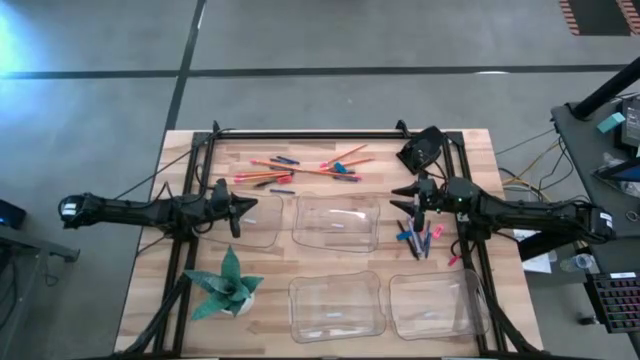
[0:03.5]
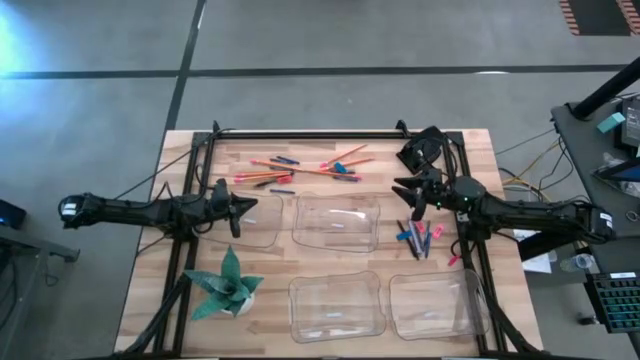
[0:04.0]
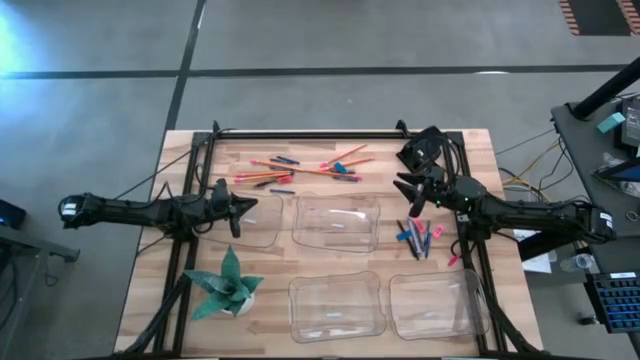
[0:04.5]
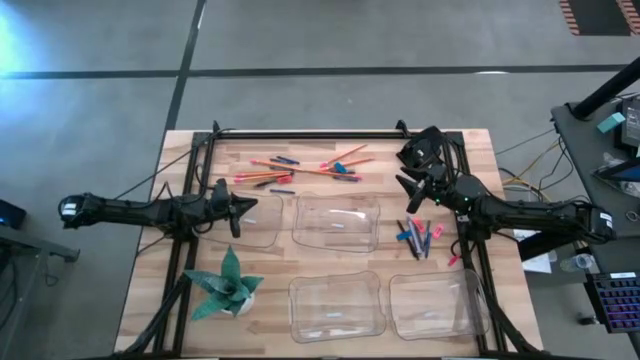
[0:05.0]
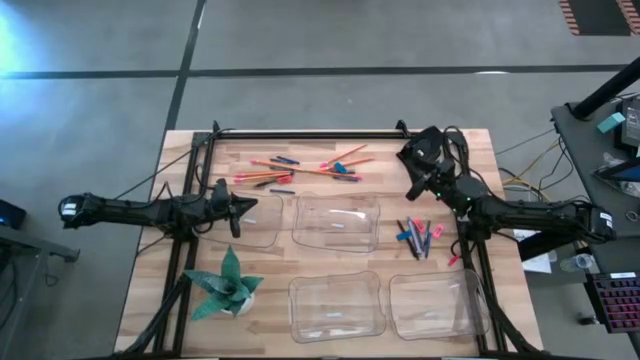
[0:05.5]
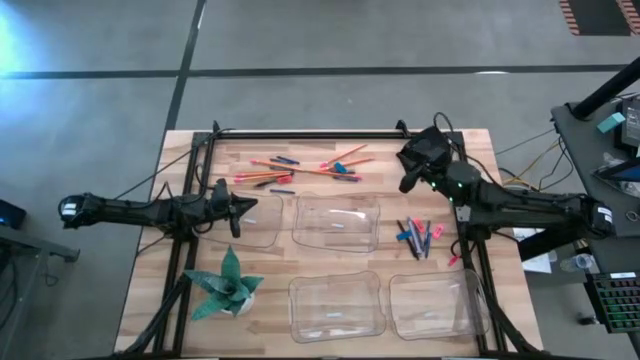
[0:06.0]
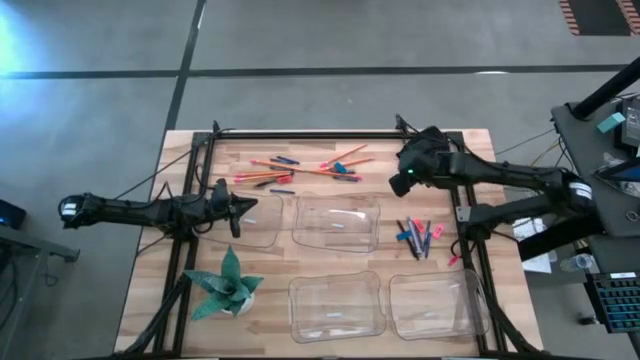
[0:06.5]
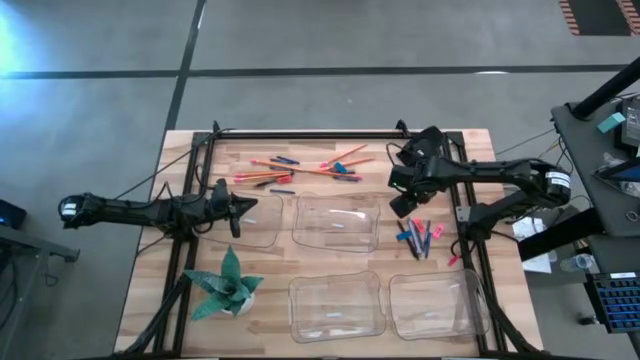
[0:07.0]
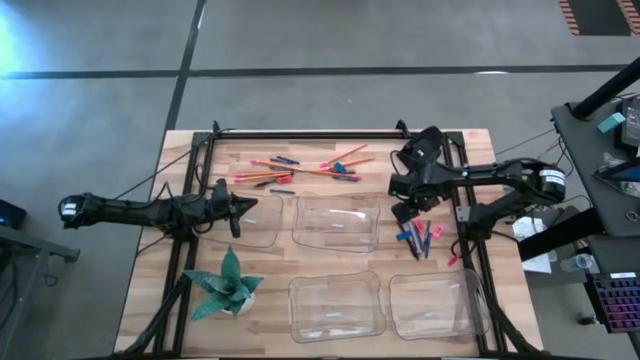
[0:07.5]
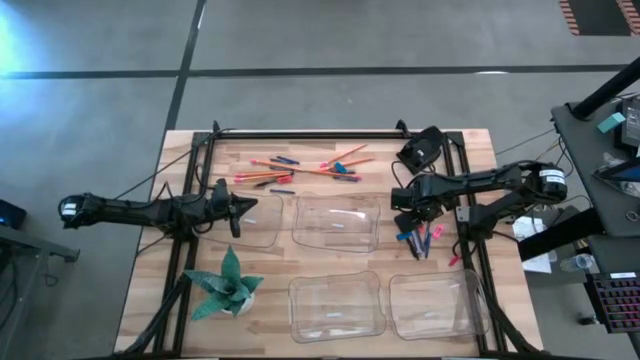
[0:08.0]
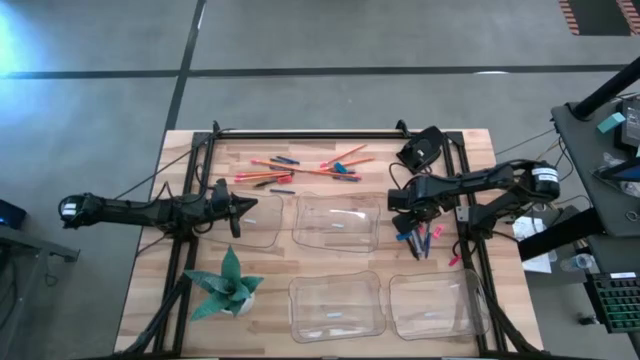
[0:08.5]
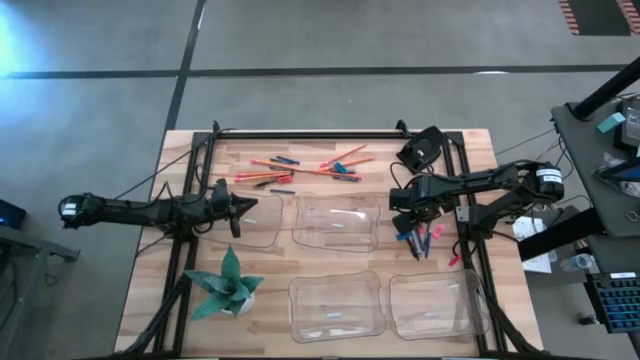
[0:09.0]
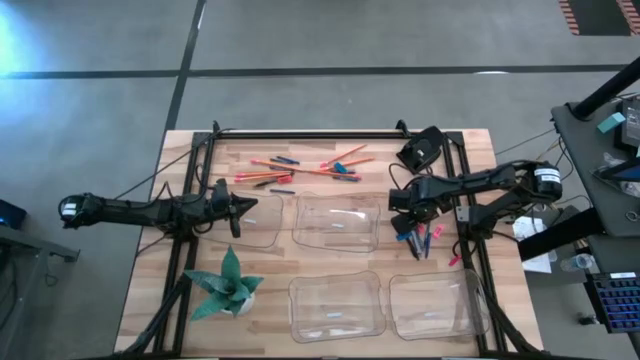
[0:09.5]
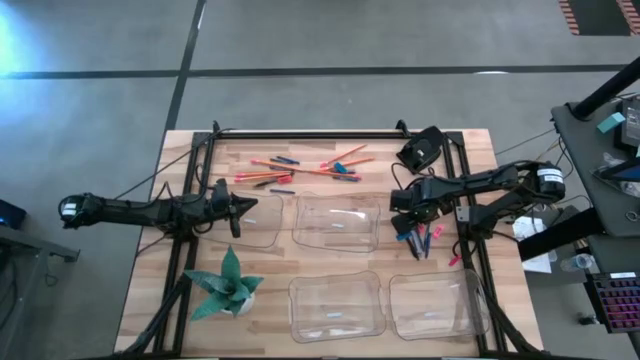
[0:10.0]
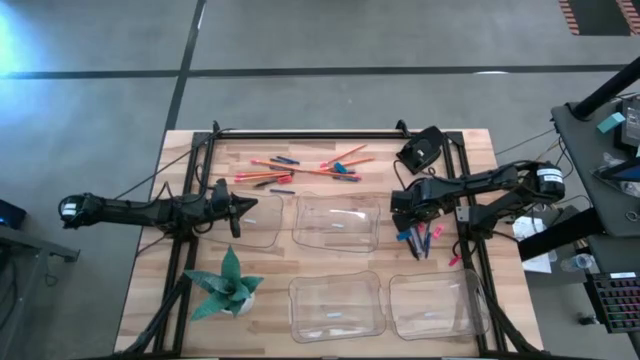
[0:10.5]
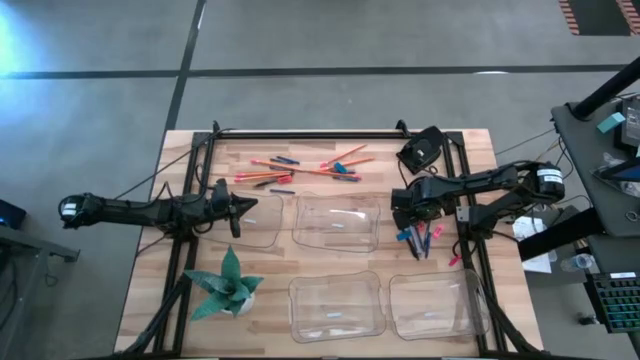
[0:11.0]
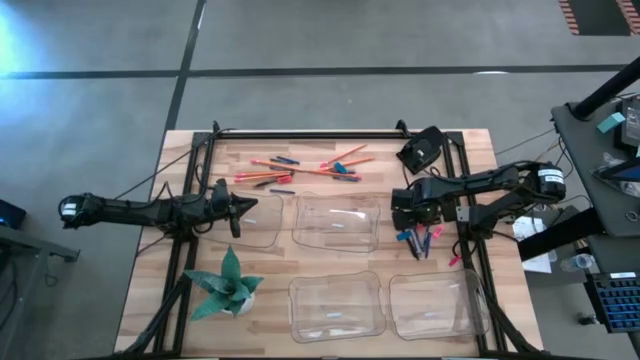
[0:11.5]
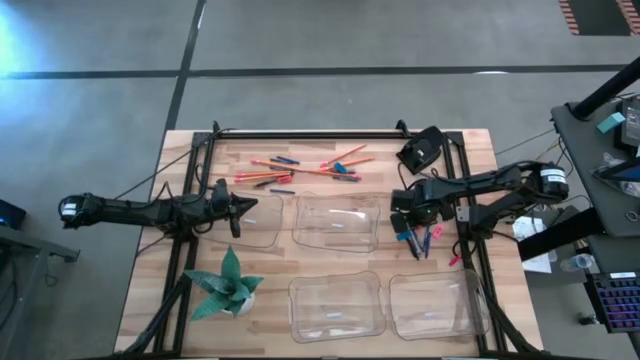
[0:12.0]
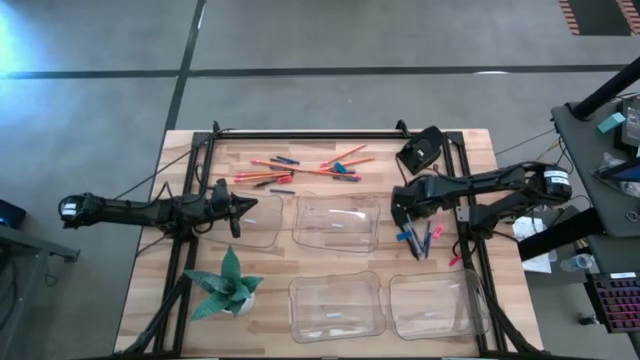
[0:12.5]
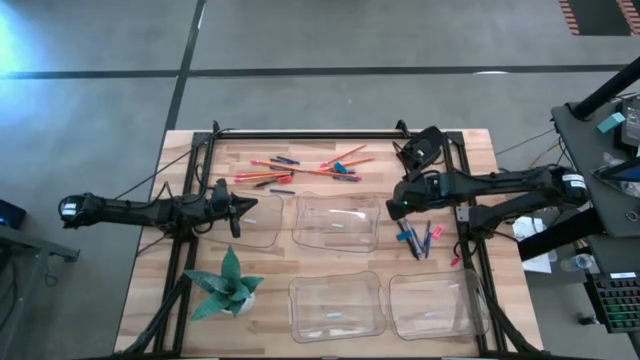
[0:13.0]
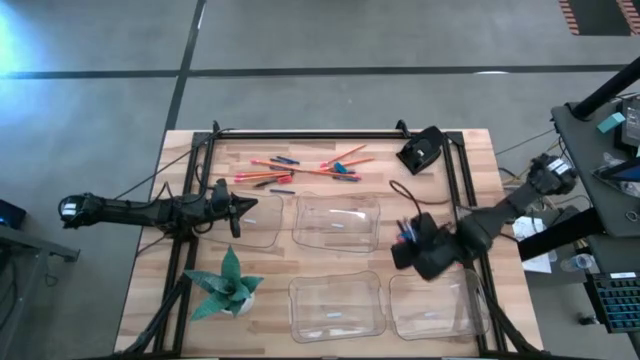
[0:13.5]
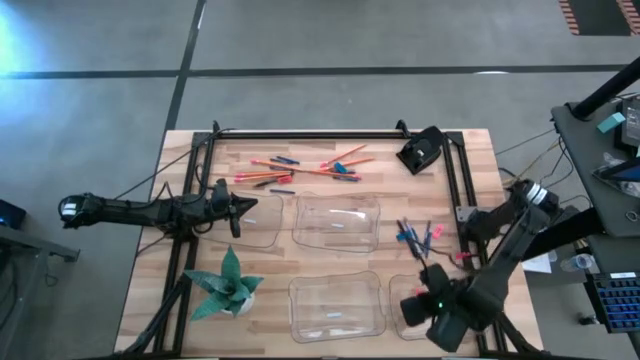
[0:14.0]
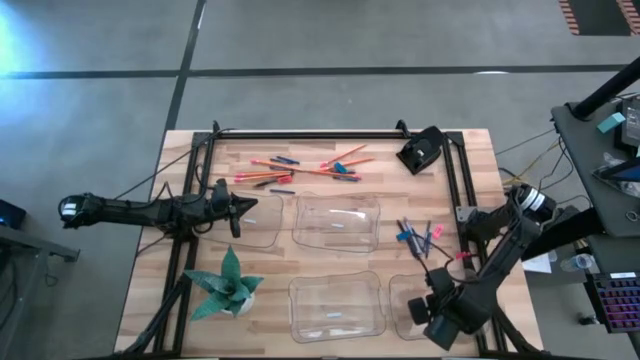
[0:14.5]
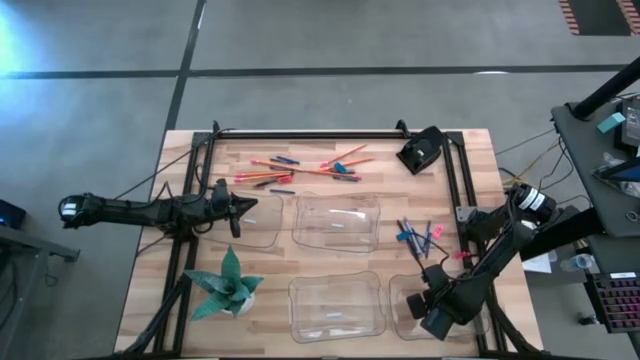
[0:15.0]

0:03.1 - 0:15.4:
Task: Sort crayons/erasers/pens/pencils in bins
Put the orange eraser into the bottom right transparent bin

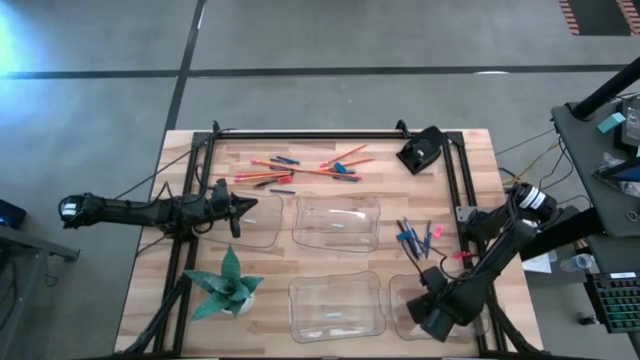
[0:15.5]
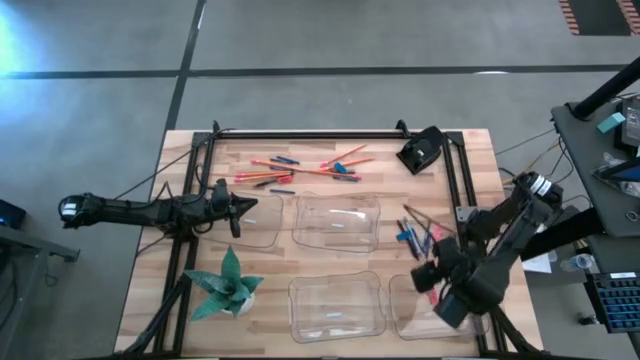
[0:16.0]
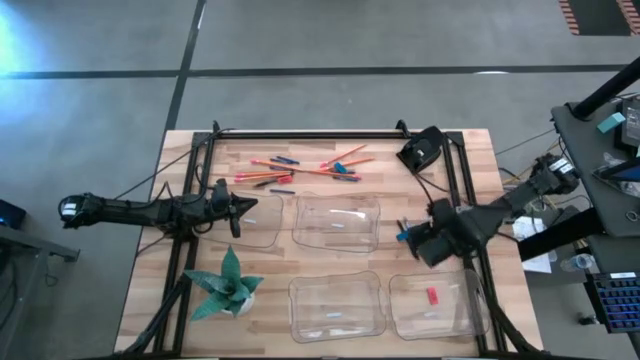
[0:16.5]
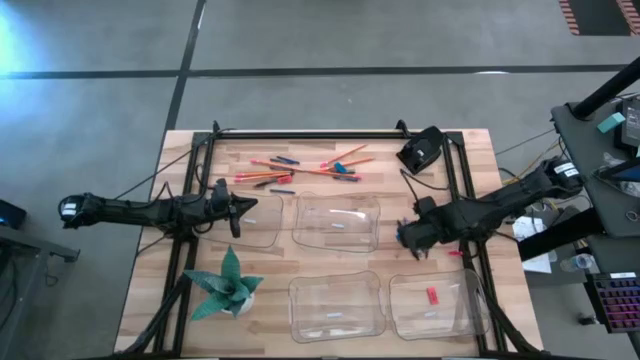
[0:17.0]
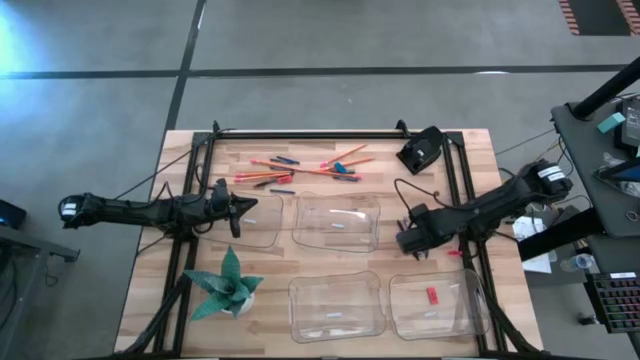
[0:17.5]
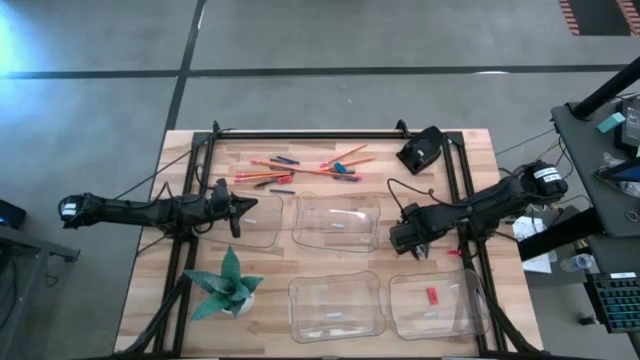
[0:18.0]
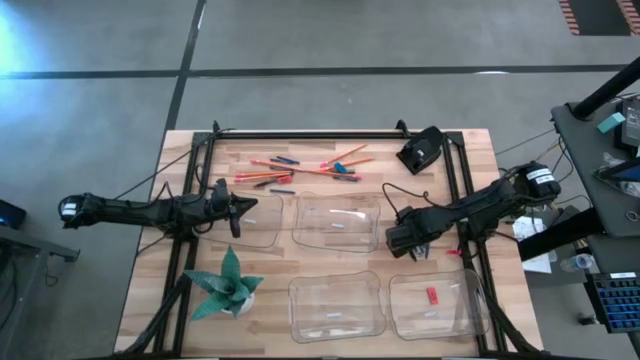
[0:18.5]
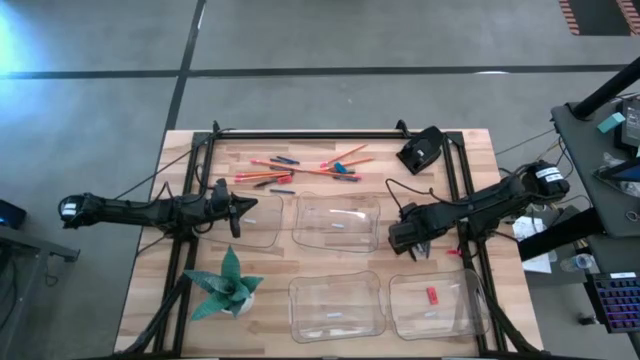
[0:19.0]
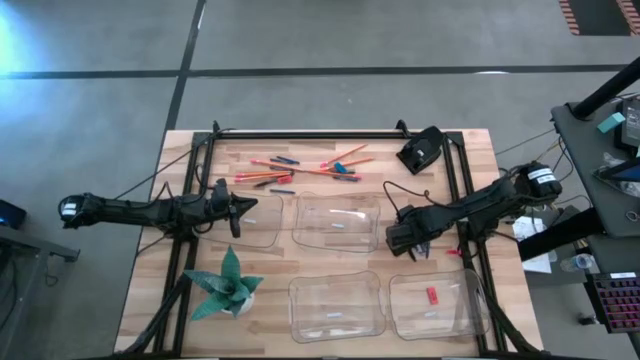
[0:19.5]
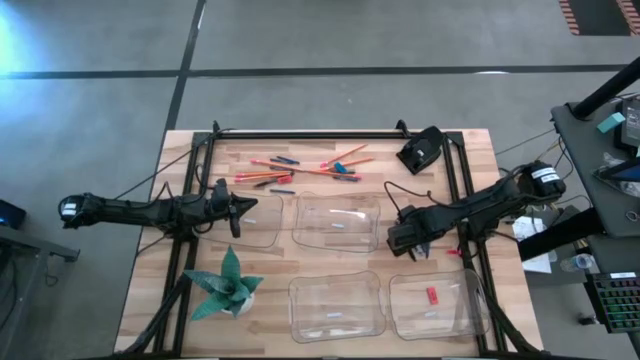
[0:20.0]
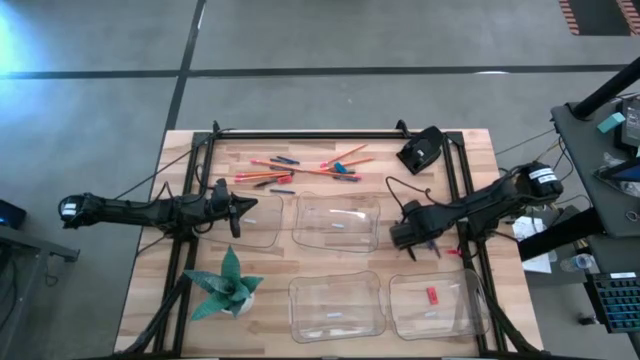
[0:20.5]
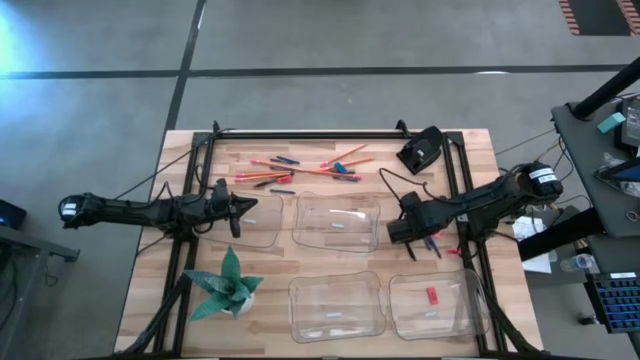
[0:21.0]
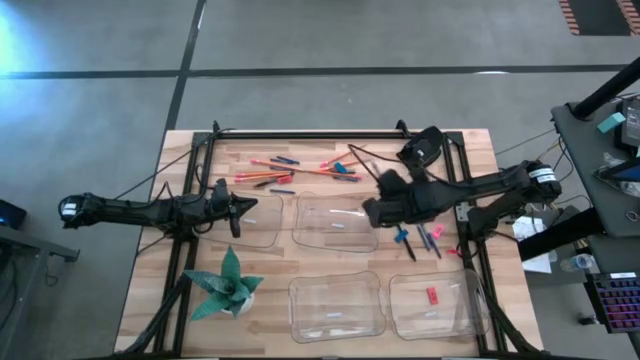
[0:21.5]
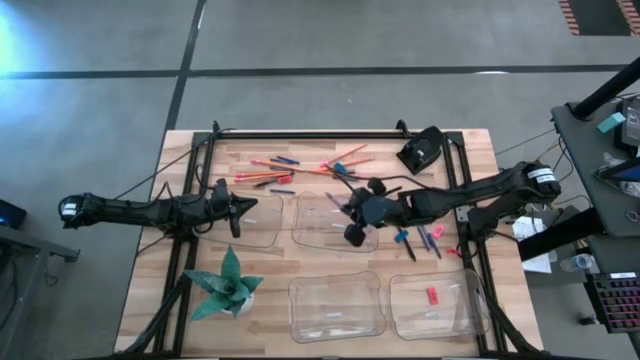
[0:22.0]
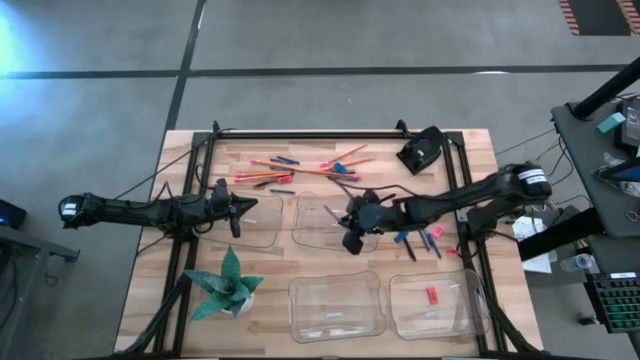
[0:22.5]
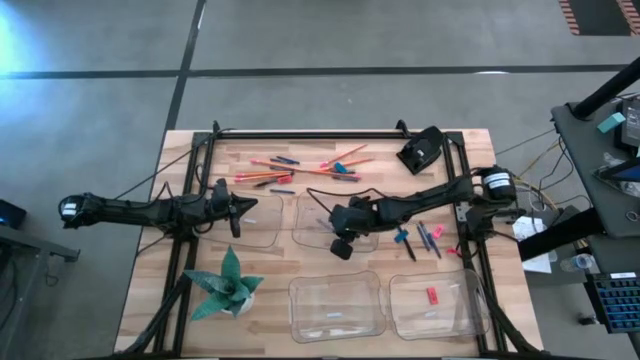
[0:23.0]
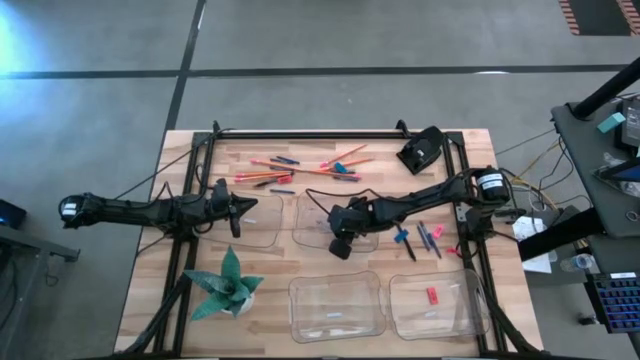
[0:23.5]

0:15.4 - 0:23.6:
Put the gray pen into the top right transparent bin

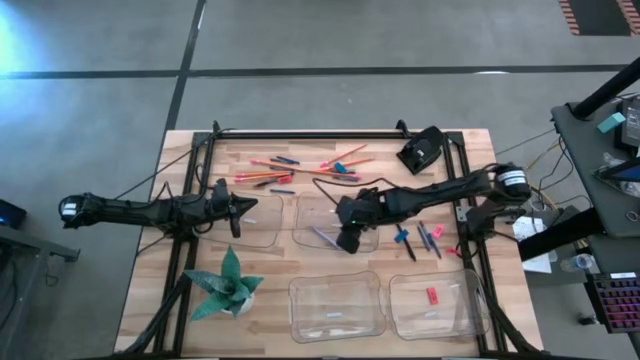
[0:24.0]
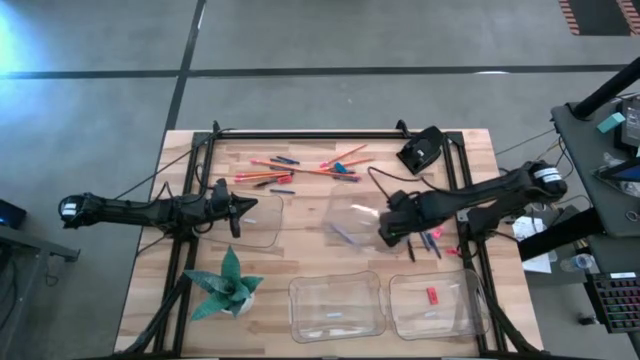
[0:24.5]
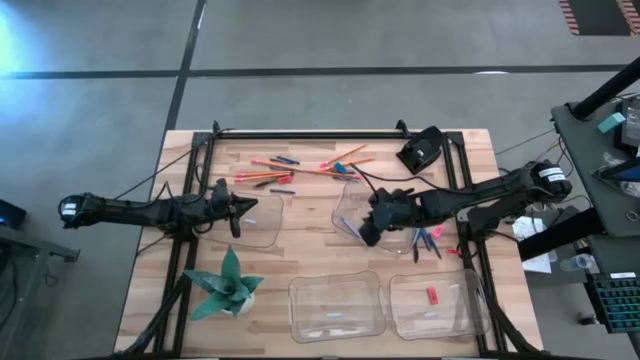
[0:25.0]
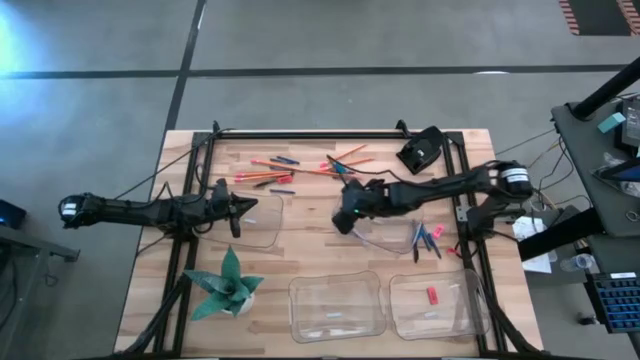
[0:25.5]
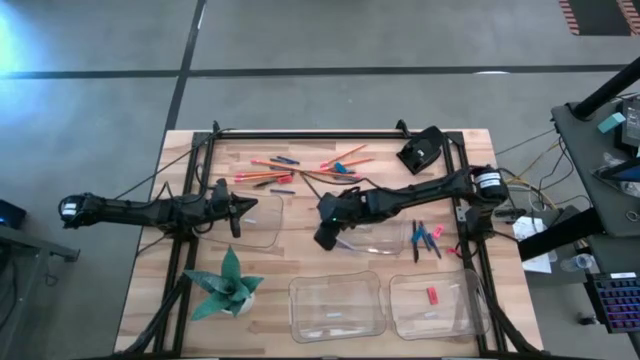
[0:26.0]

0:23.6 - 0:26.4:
Adjust the top right transparent bin
